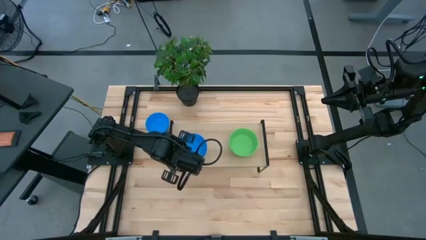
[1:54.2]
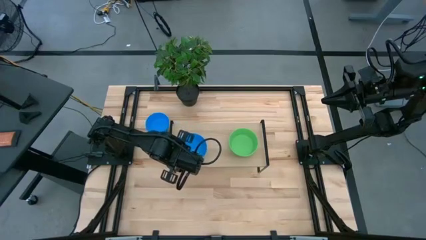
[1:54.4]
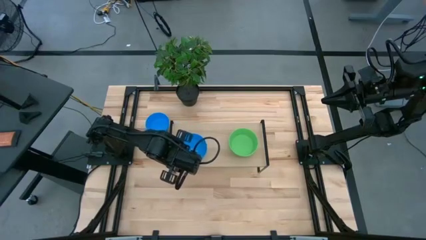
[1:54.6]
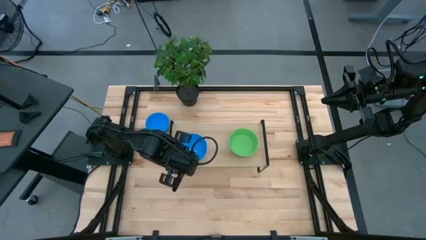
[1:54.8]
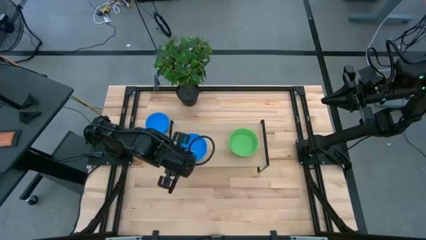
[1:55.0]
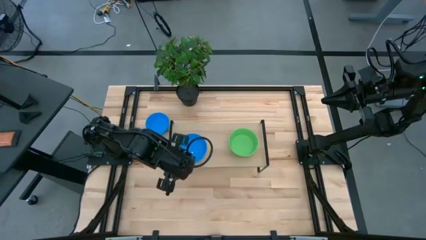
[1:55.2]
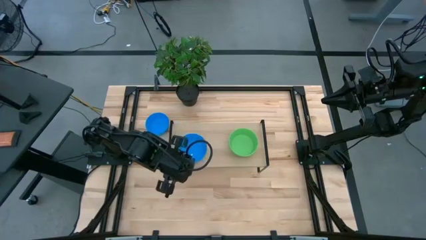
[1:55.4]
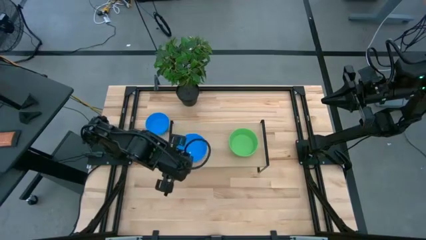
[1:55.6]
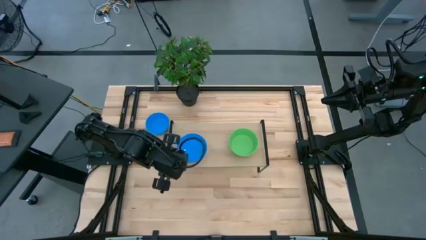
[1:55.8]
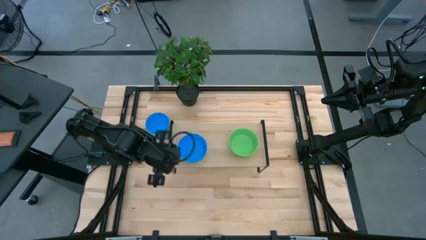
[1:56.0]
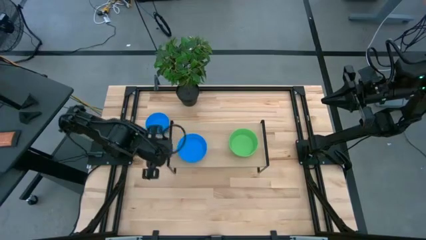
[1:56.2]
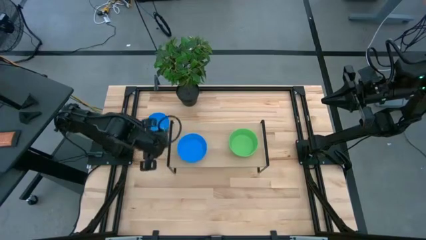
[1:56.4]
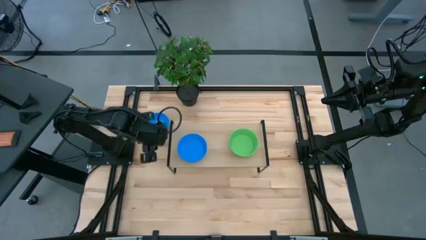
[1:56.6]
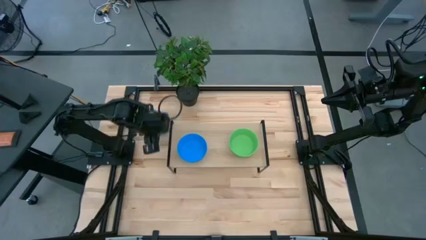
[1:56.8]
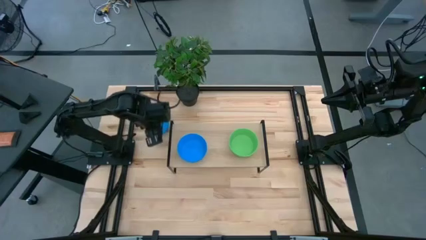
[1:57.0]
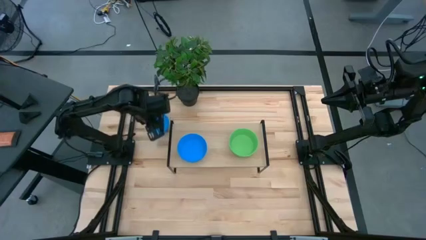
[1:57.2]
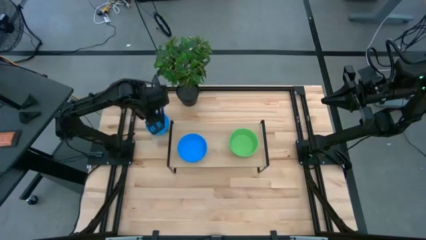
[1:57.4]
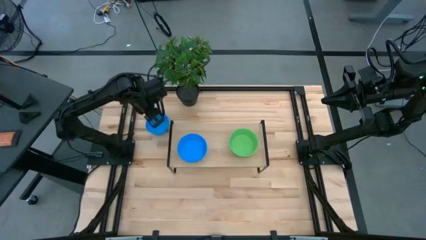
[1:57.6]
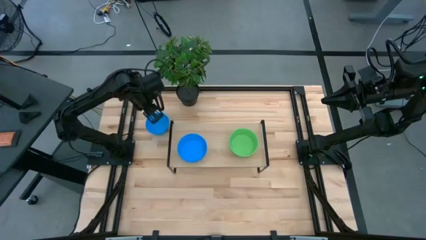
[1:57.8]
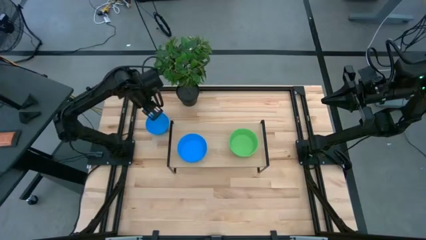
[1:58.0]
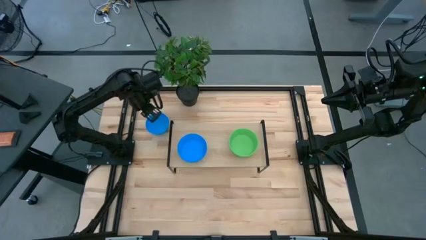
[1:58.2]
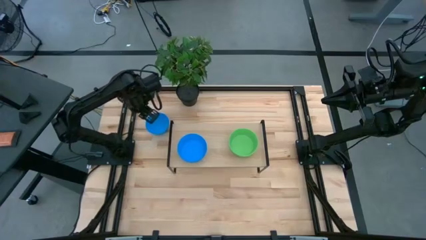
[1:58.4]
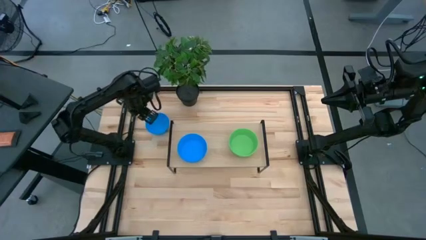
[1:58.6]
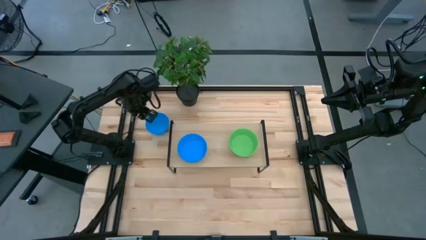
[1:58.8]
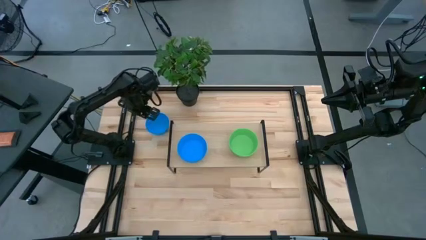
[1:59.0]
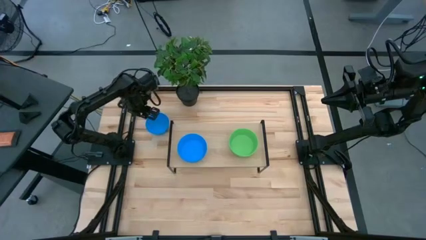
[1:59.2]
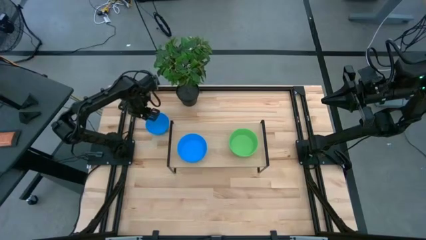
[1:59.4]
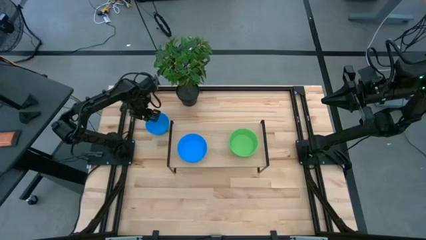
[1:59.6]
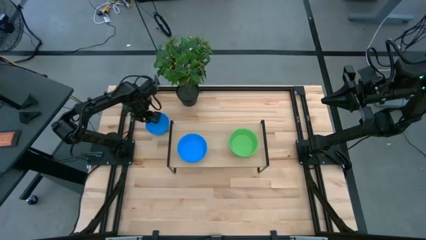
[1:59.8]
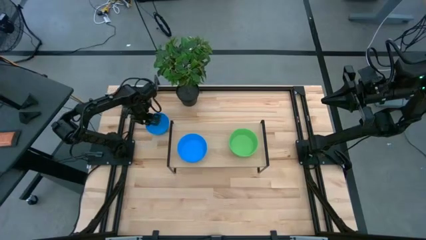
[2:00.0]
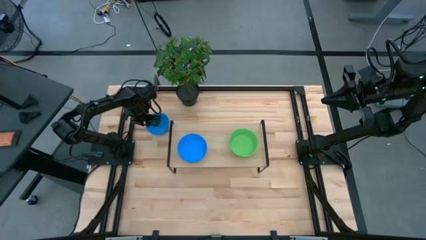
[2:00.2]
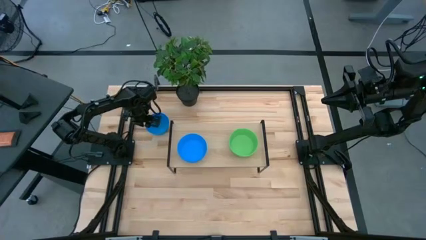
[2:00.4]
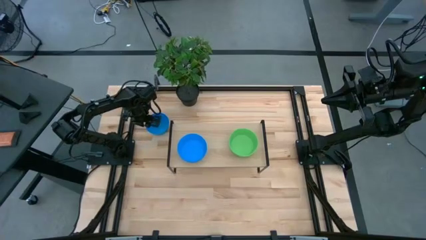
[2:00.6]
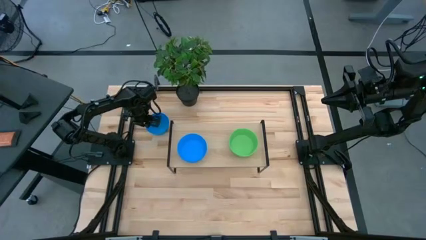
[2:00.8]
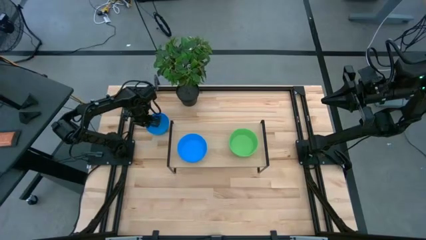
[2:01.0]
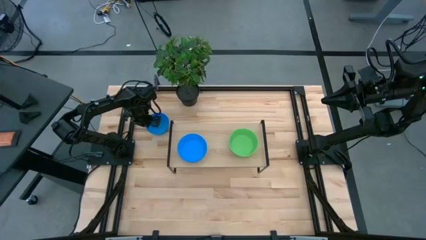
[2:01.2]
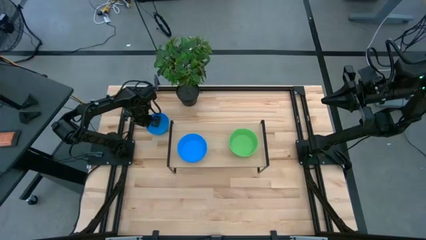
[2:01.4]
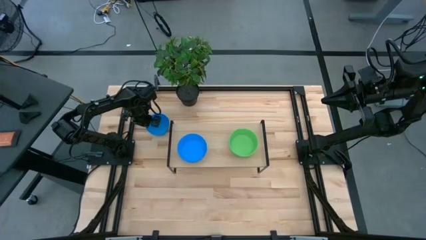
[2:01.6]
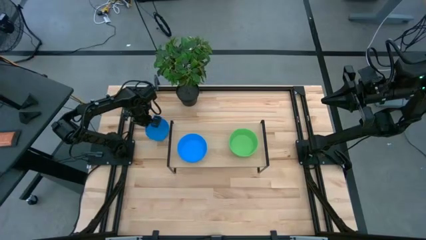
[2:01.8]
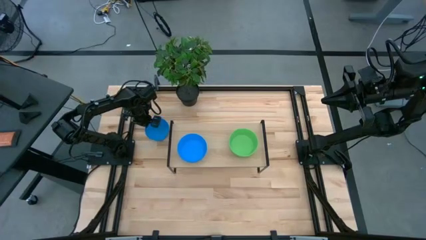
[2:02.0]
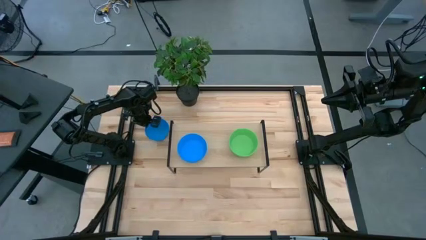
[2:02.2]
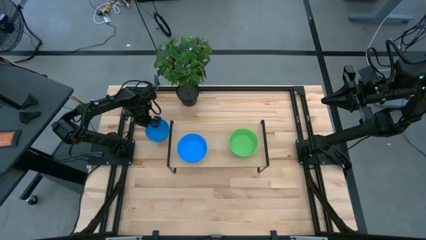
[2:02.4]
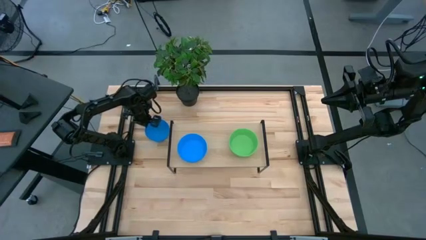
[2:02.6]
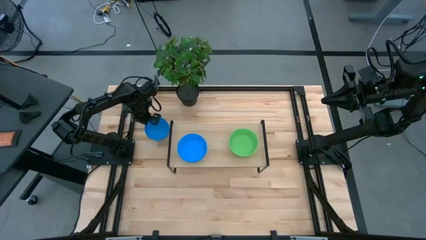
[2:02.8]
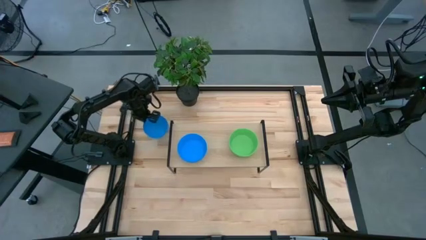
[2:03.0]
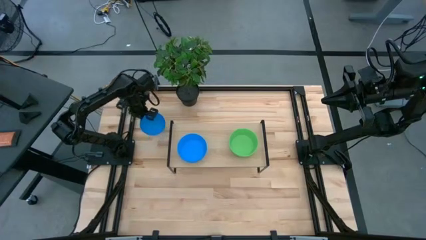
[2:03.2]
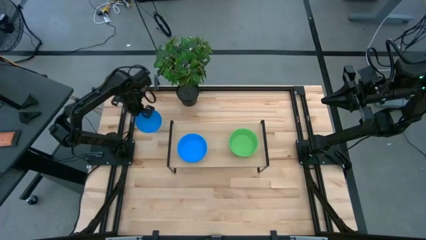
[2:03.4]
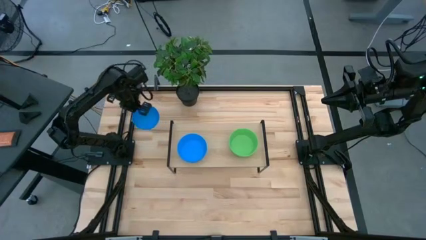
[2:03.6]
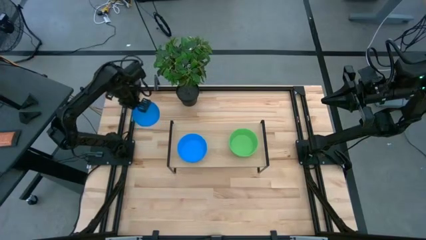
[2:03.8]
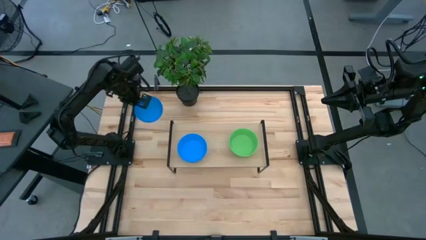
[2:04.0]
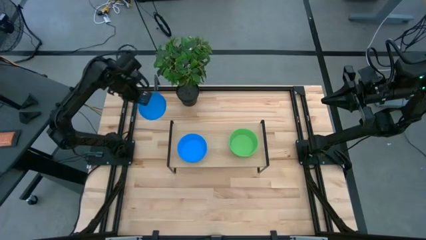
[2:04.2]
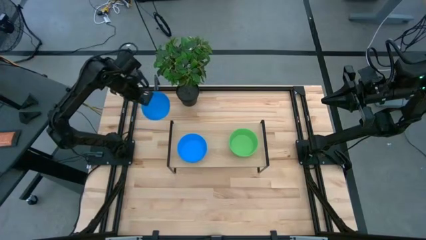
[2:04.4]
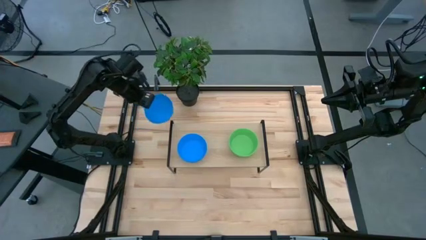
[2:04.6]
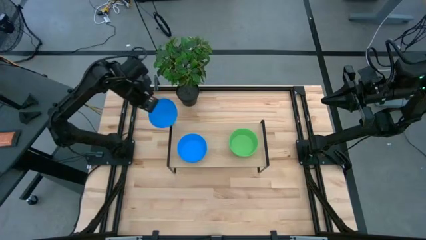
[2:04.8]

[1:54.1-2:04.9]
Task: Pick & Place Mini bowls
Stack the blue bowl on the blue bowls on the shelf
